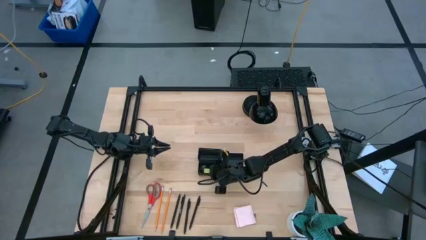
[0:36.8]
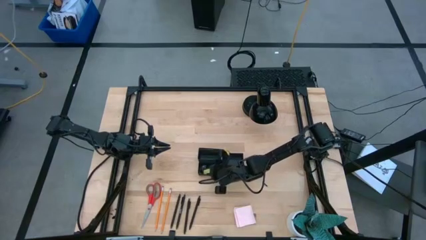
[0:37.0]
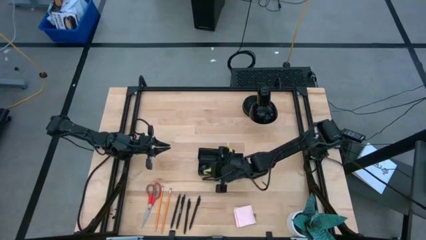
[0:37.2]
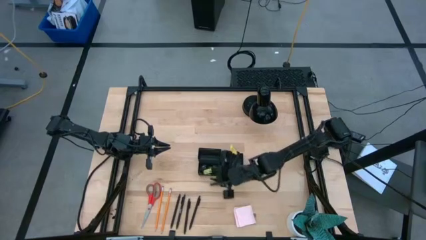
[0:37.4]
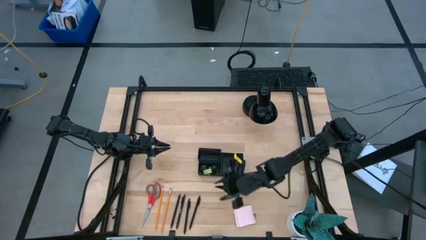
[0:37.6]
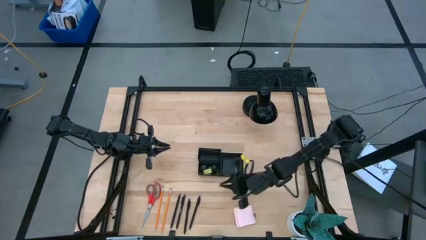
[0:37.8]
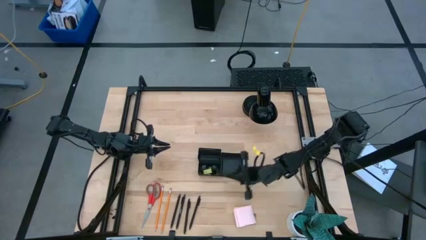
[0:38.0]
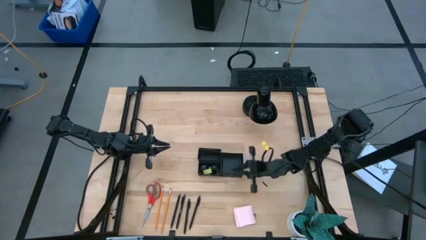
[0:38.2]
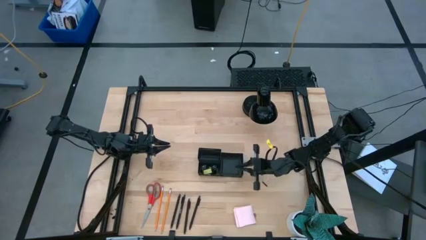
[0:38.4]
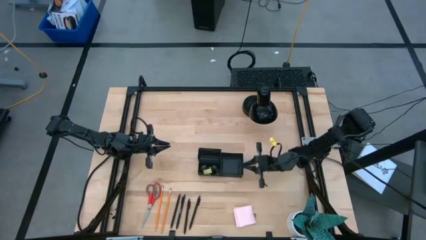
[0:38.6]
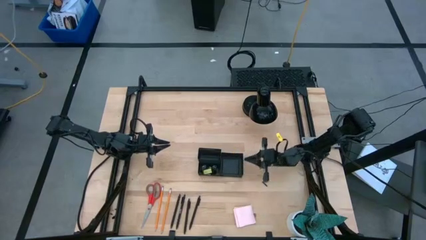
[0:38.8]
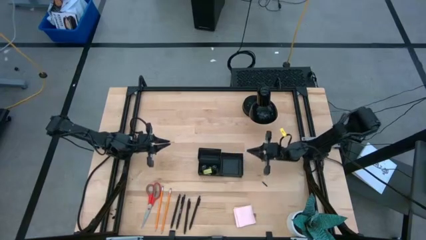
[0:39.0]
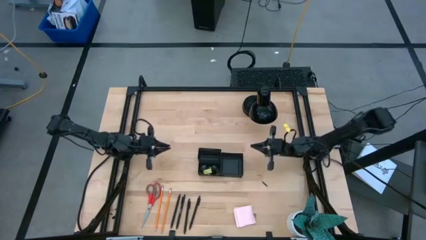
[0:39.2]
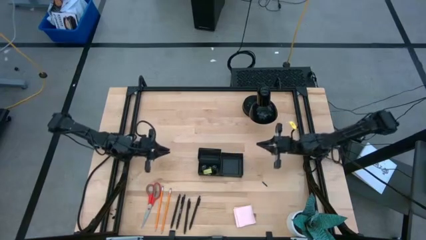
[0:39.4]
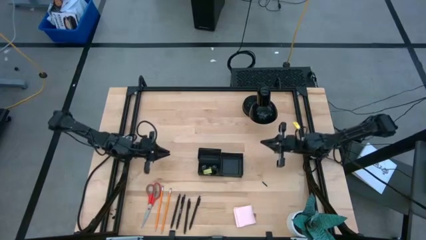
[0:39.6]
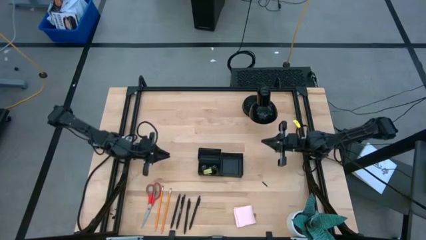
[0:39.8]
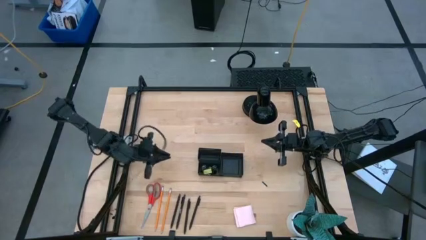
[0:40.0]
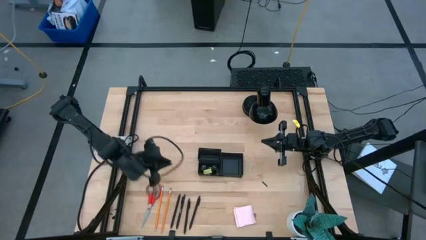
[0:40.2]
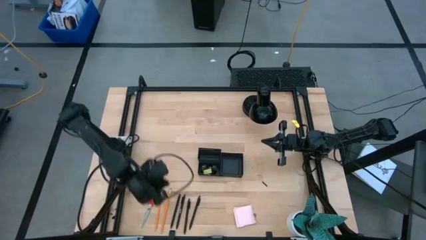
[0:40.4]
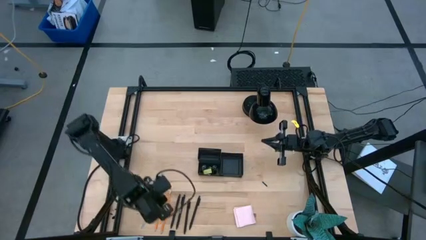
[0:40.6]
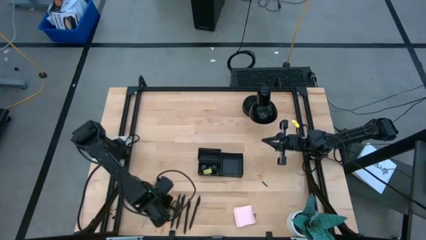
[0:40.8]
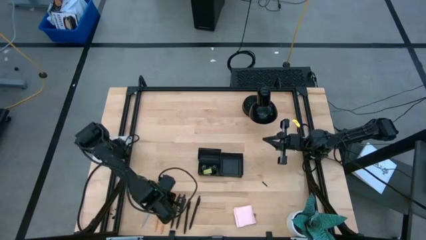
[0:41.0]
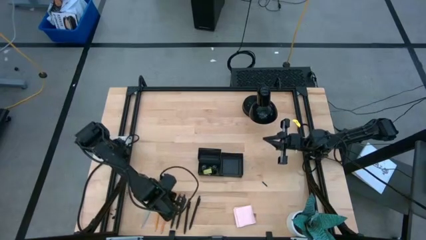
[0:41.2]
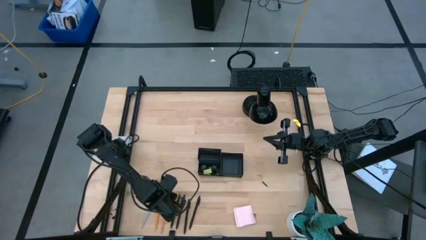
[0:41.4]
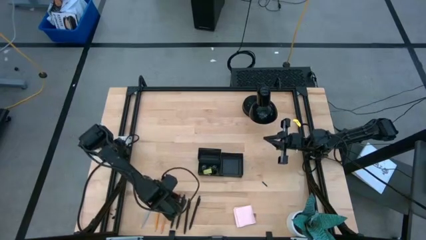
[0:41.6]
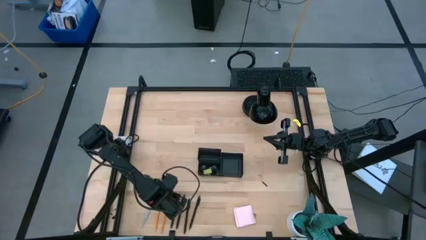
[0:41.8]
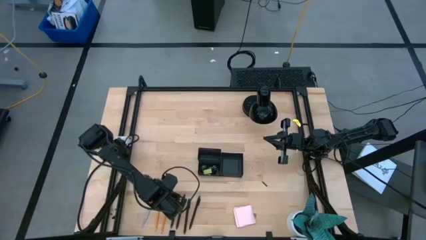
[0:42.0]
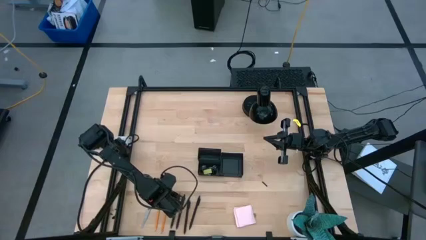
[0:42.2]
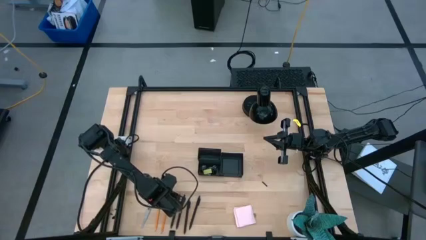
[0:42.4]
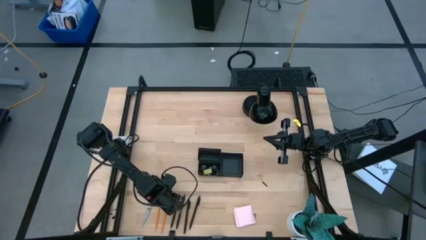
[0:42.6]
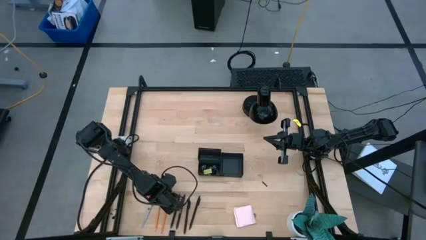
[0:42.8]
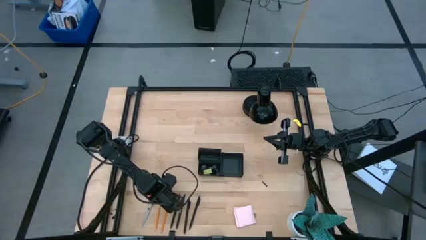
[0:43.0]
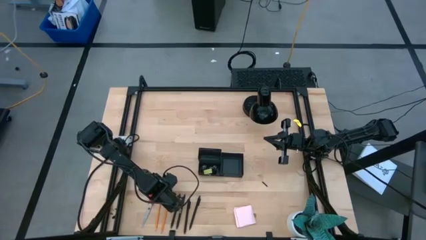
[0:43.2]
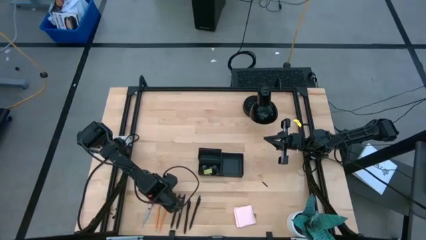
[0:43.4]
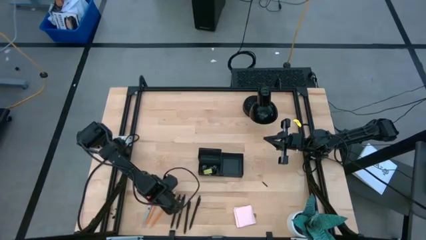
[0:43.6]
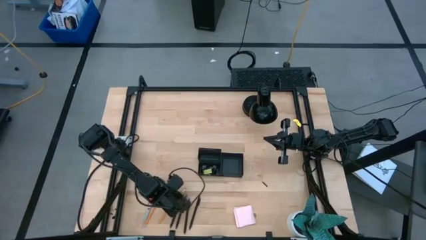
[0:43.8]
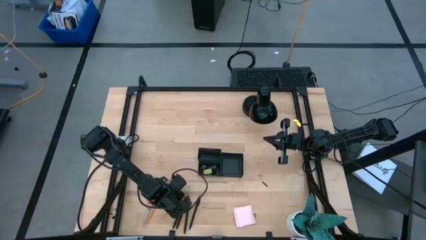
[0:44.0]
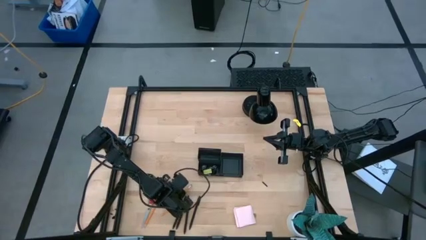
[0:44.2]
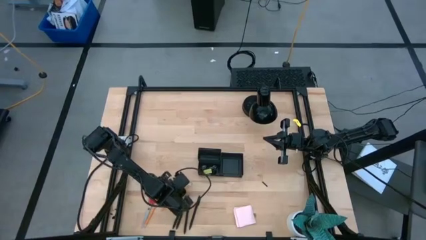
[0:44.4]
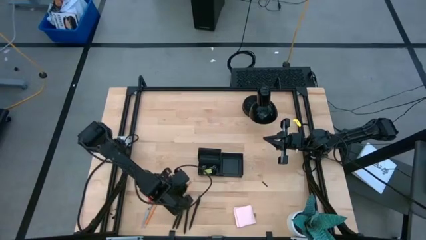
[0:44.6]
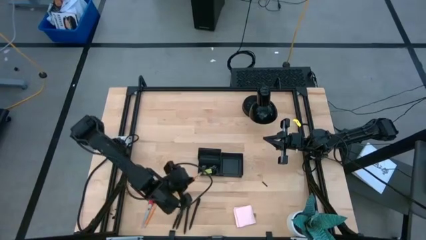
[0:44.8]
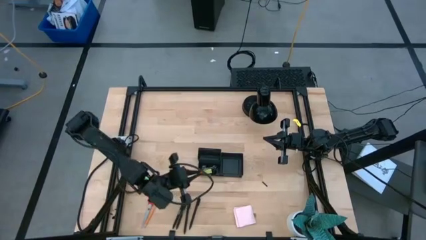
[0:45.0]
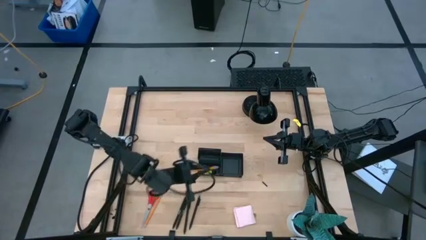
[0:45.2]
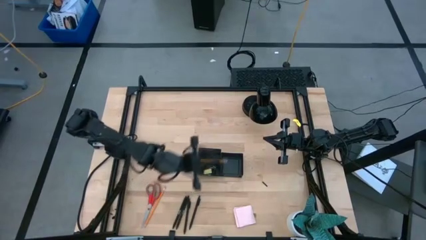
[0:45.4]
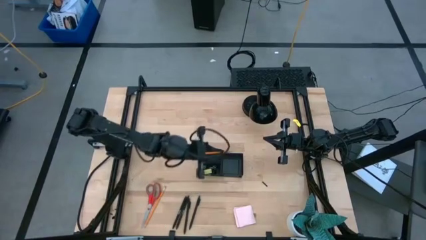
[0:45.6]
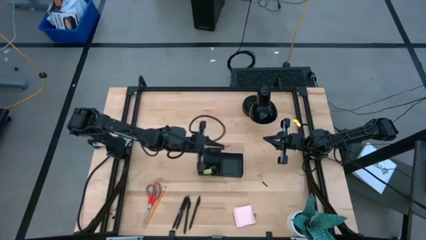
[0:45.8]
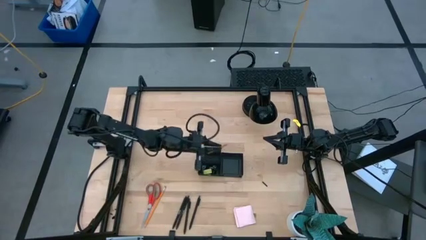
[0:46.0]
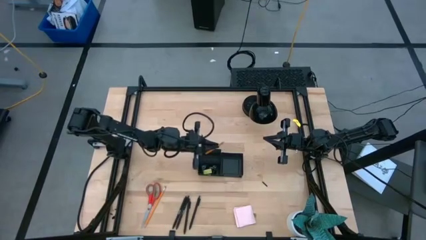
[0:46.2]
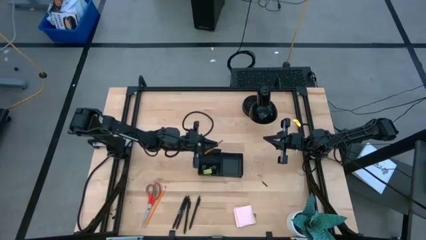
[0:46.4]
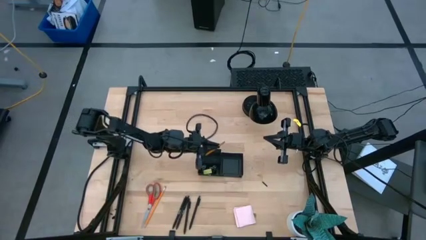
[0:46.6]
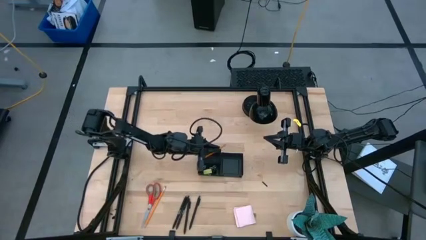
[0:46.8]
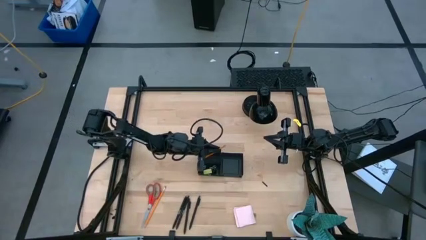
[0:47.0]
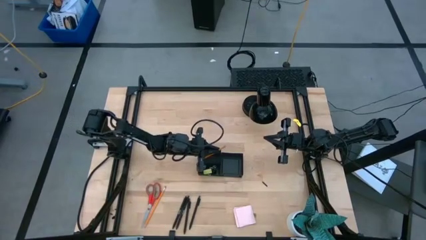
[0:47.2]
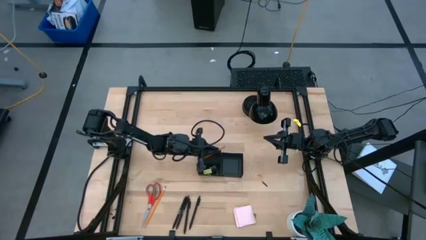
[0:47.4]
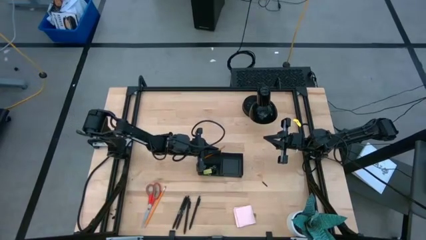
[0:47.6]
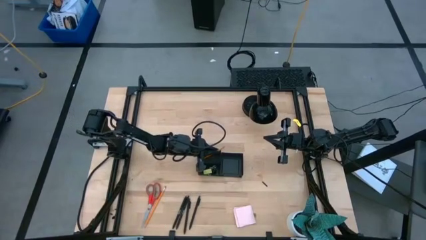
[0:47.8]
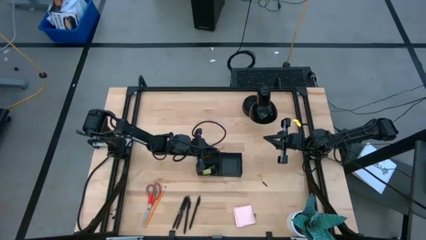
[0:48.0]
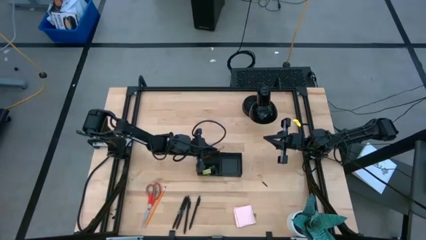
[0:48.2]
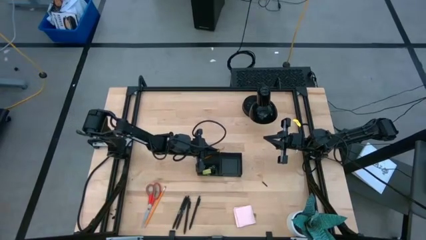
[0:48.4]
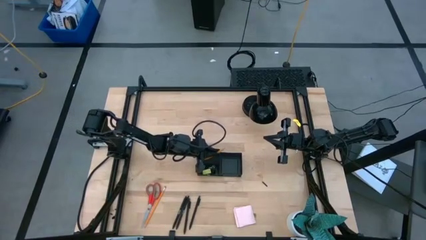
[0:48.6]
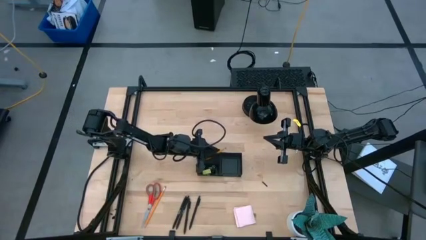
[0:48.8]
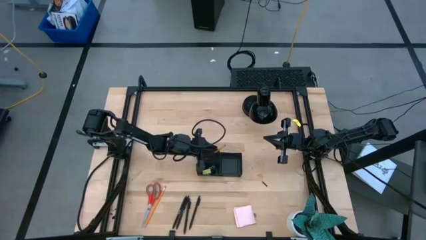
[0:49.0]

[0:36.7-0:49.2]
Task: Pick and place office supplies into organizer
Put the right yellow pencil into the black desk organizer
